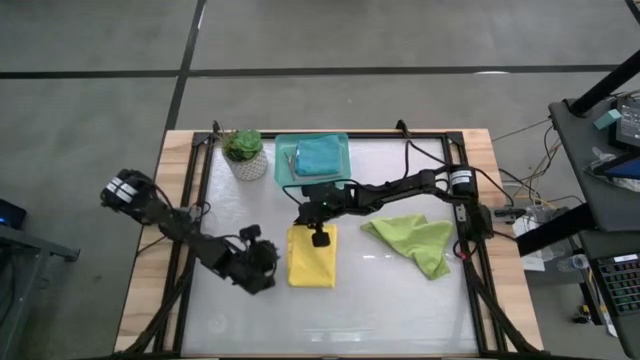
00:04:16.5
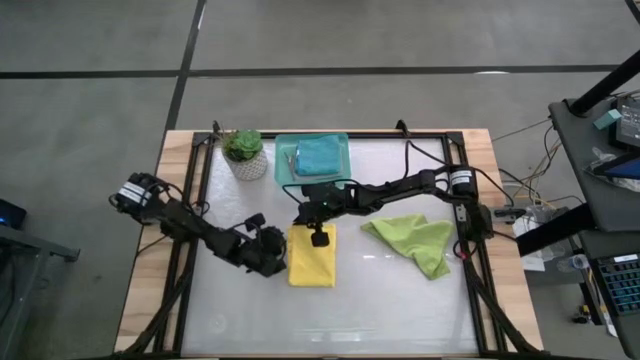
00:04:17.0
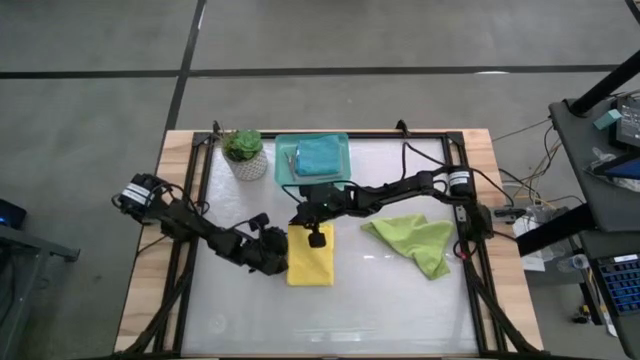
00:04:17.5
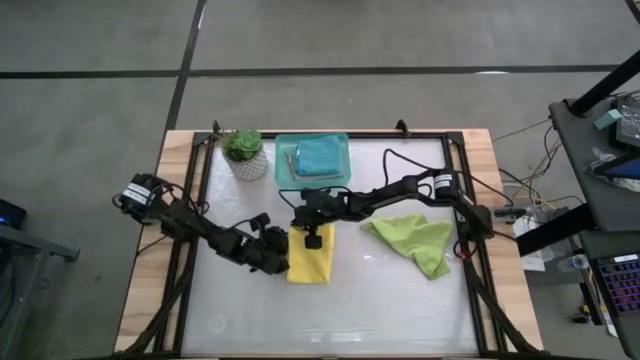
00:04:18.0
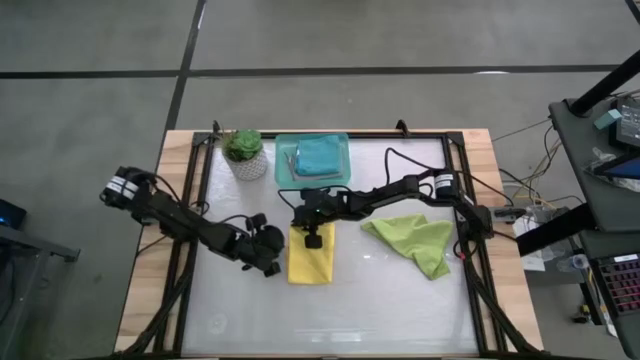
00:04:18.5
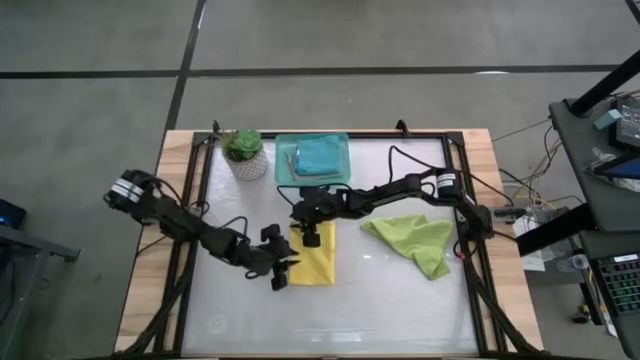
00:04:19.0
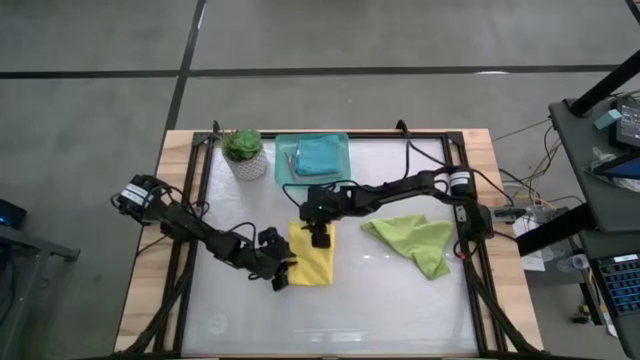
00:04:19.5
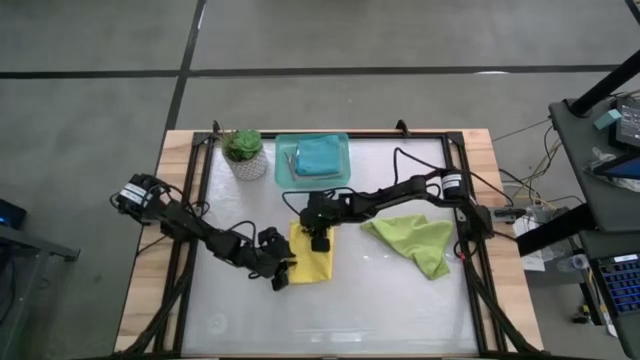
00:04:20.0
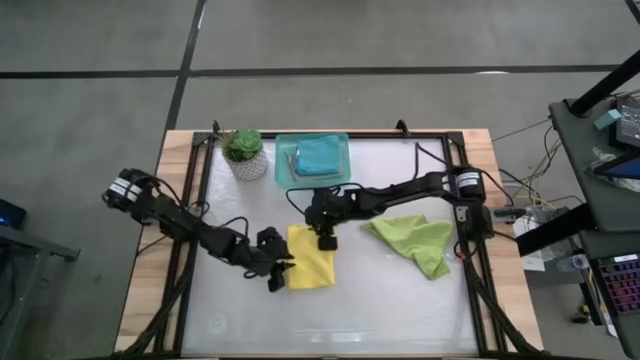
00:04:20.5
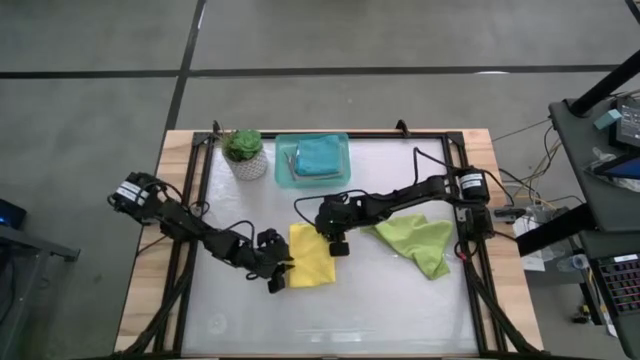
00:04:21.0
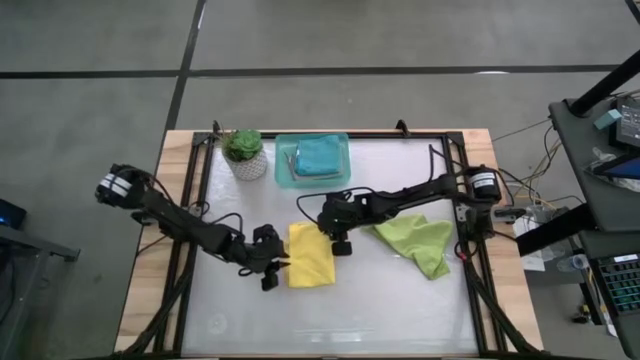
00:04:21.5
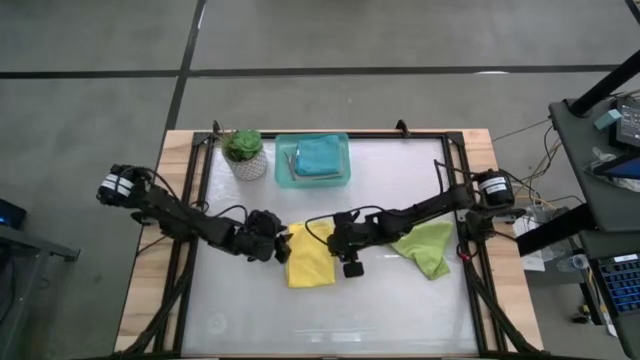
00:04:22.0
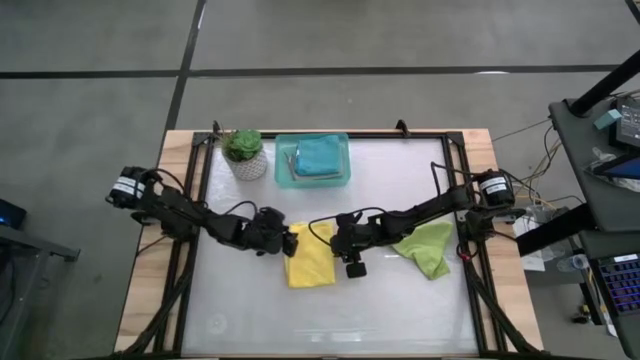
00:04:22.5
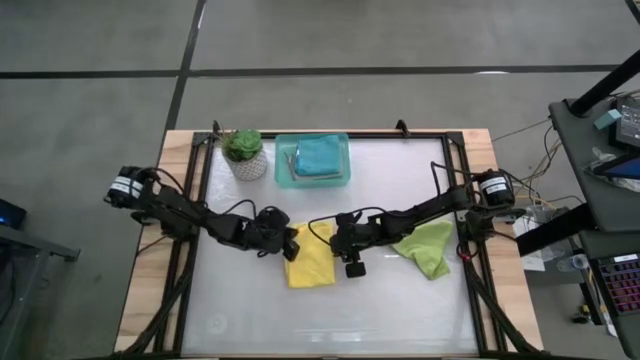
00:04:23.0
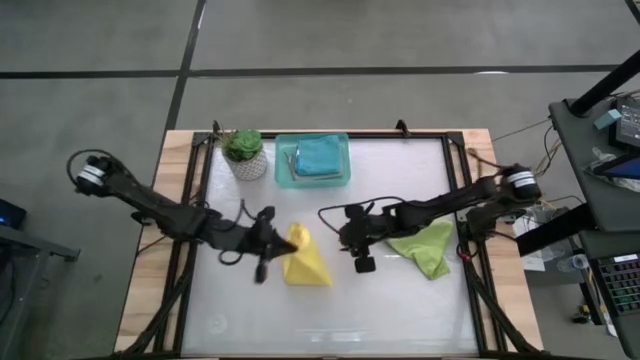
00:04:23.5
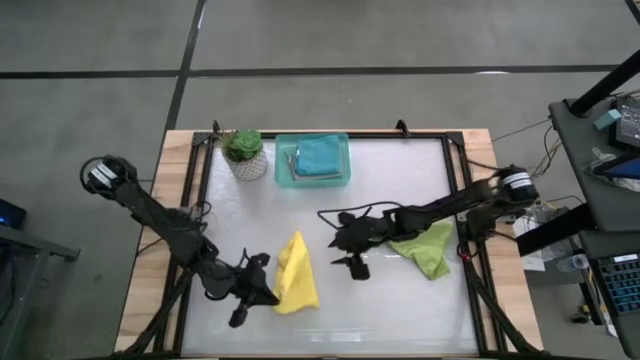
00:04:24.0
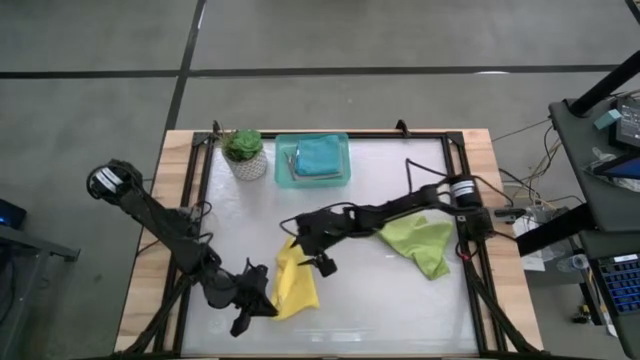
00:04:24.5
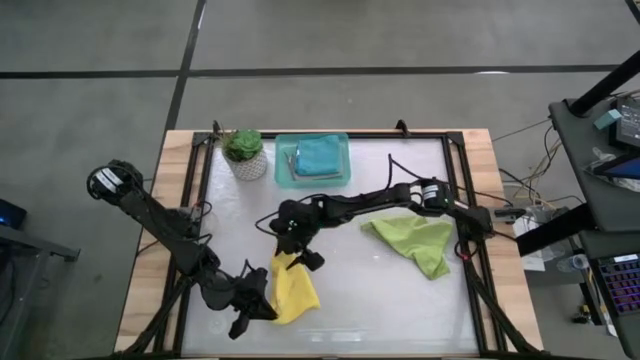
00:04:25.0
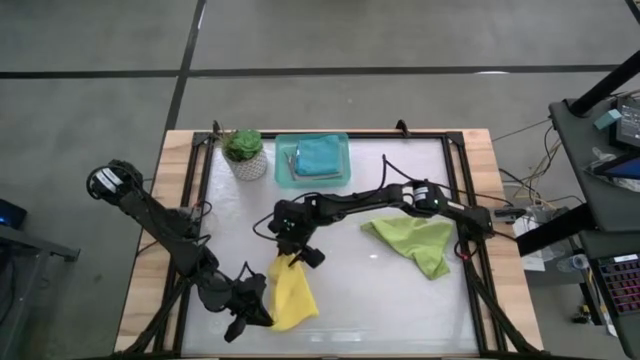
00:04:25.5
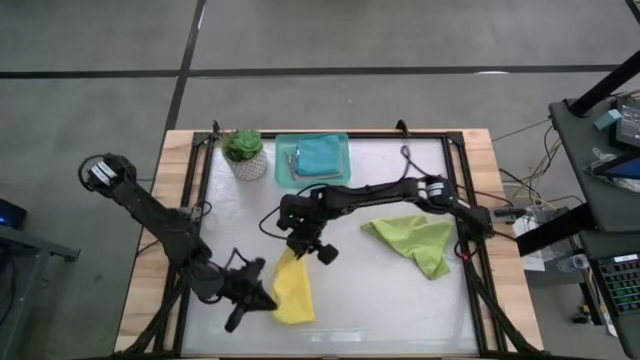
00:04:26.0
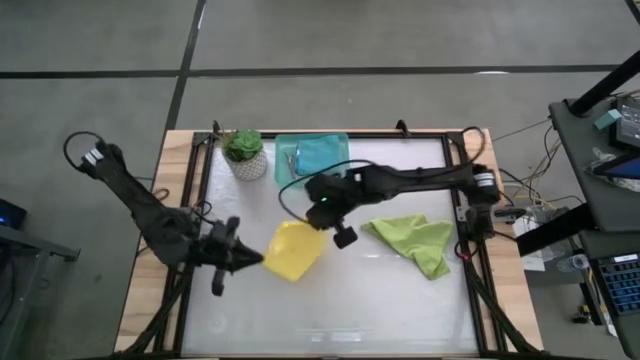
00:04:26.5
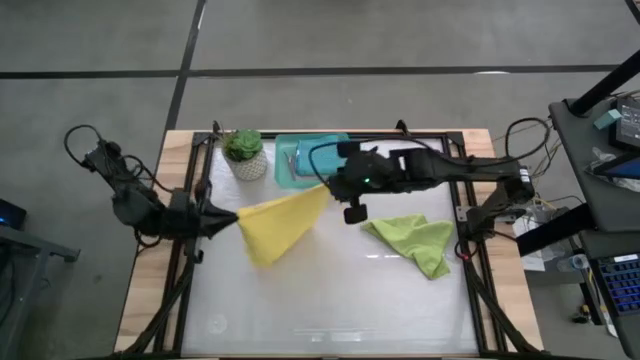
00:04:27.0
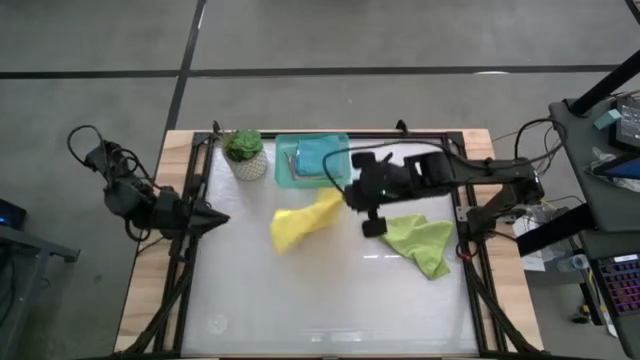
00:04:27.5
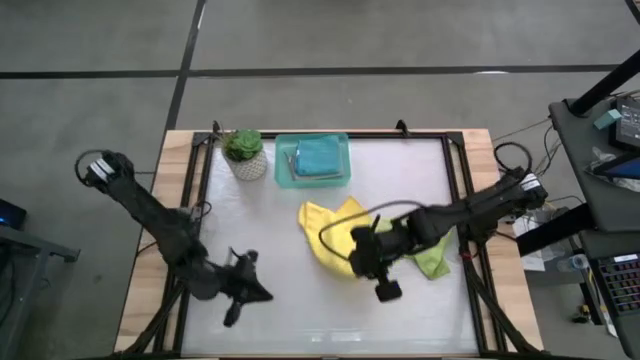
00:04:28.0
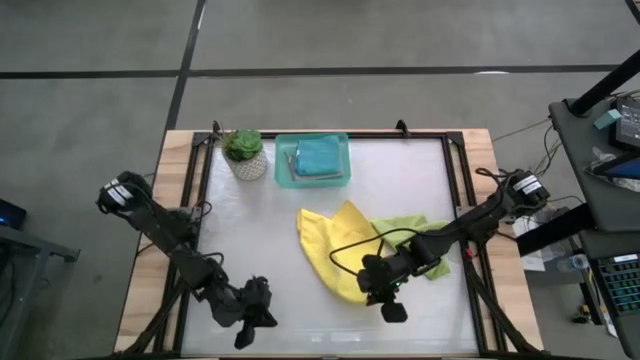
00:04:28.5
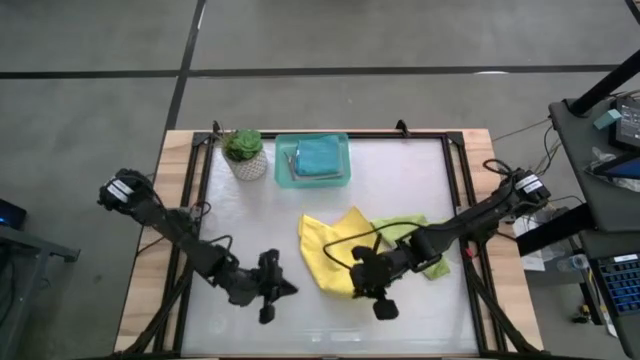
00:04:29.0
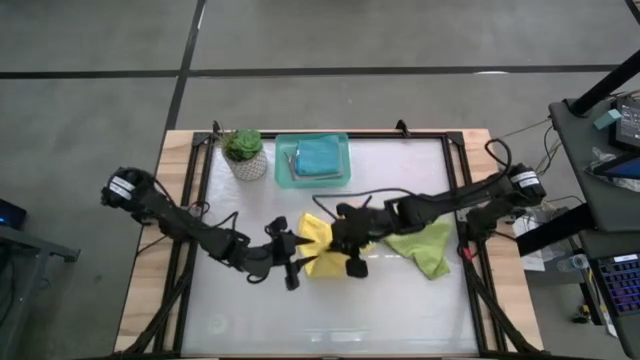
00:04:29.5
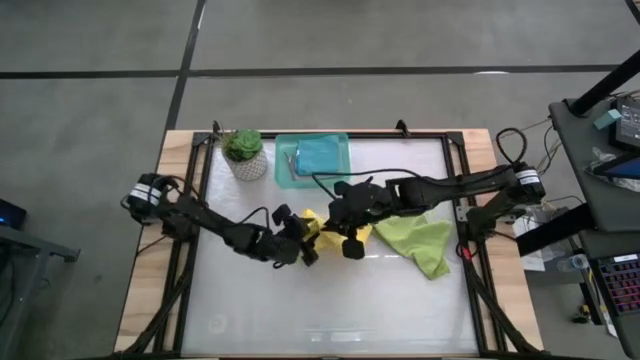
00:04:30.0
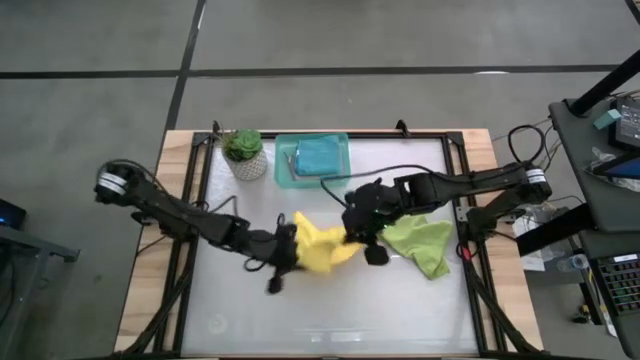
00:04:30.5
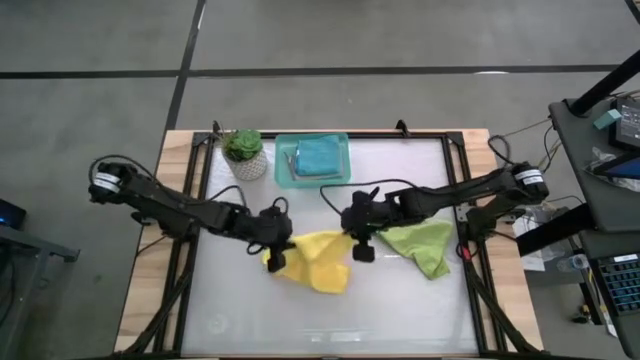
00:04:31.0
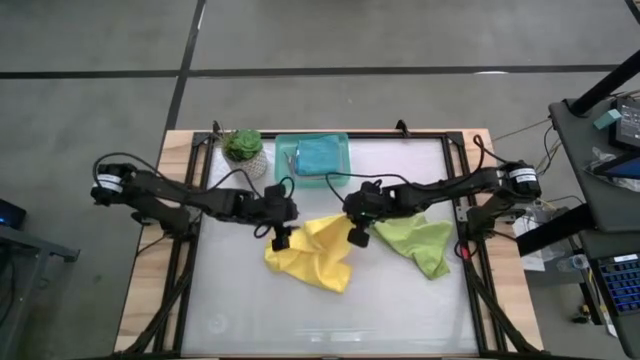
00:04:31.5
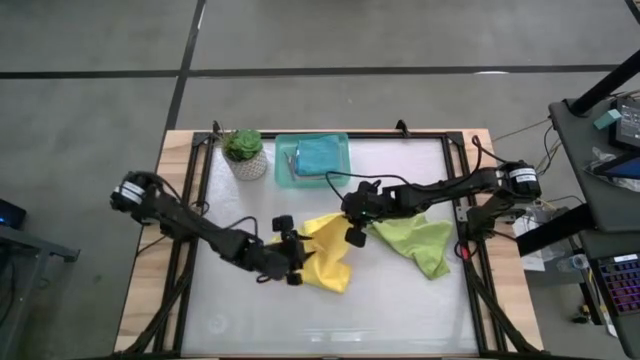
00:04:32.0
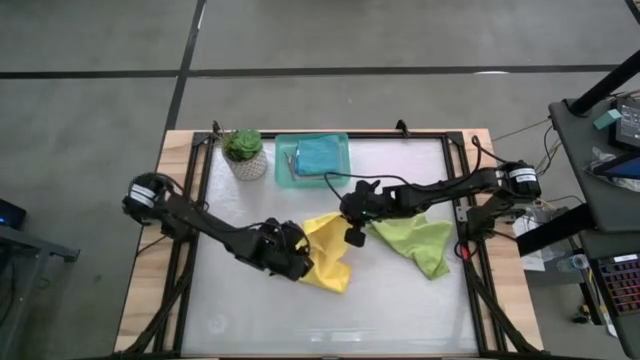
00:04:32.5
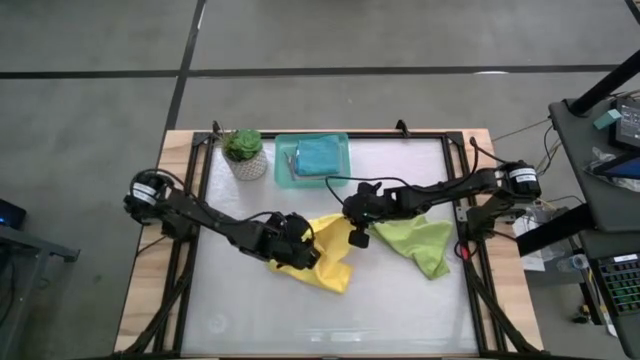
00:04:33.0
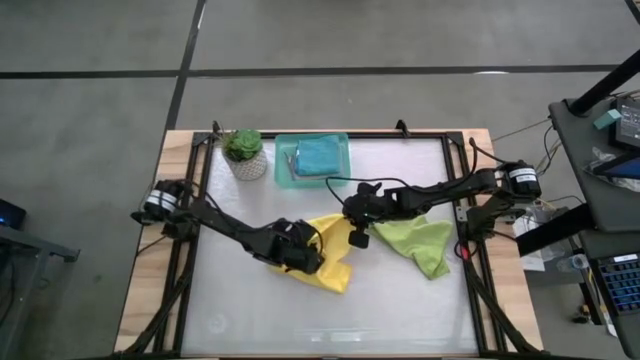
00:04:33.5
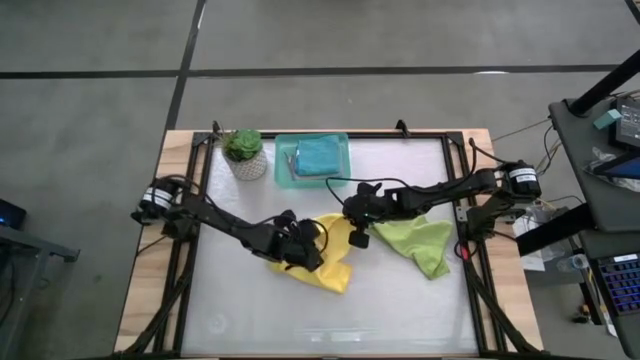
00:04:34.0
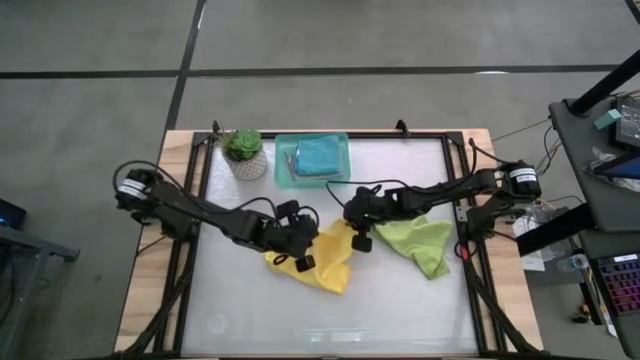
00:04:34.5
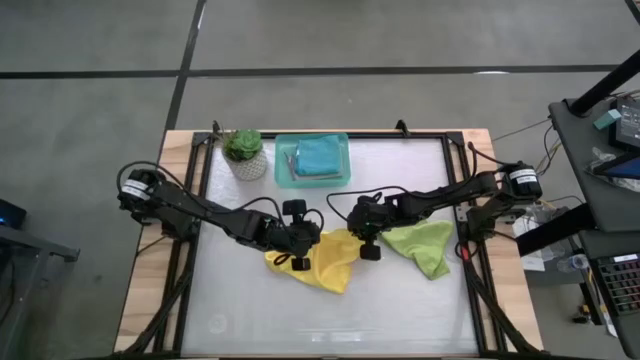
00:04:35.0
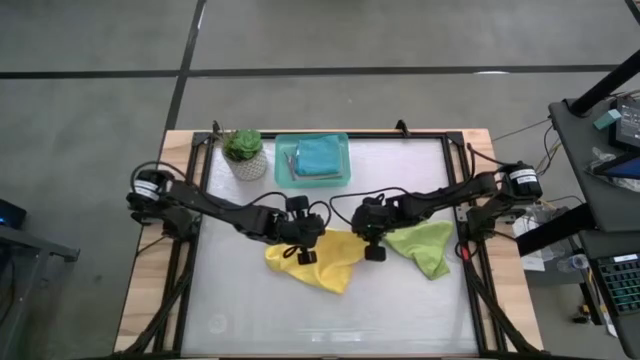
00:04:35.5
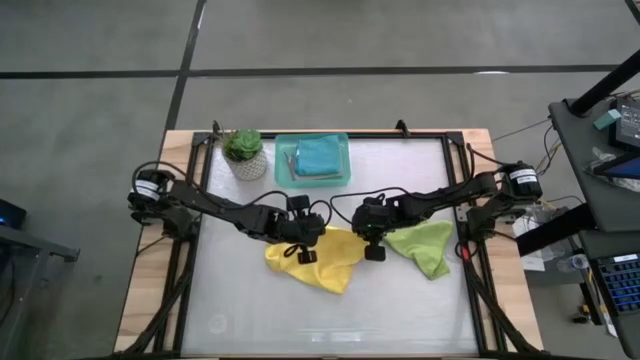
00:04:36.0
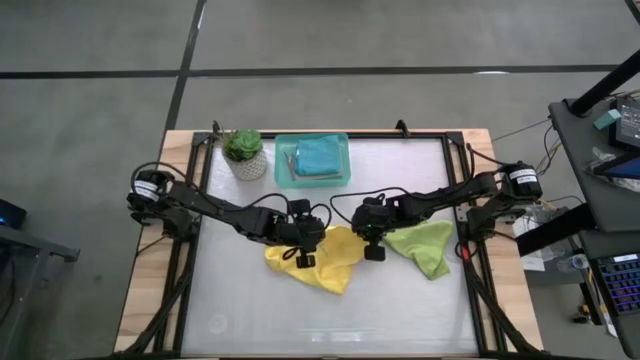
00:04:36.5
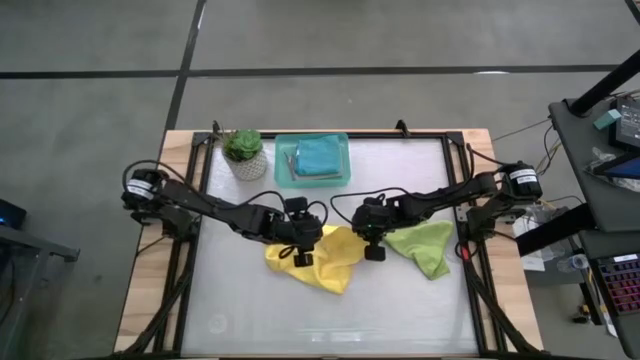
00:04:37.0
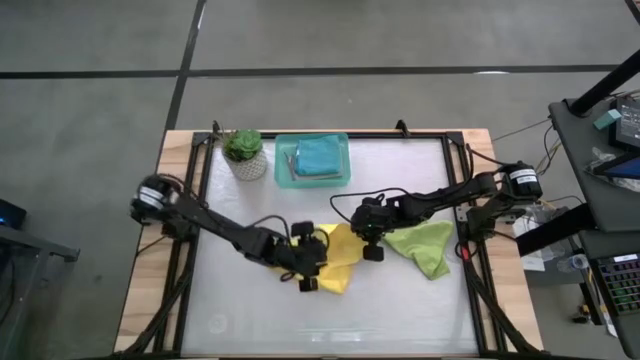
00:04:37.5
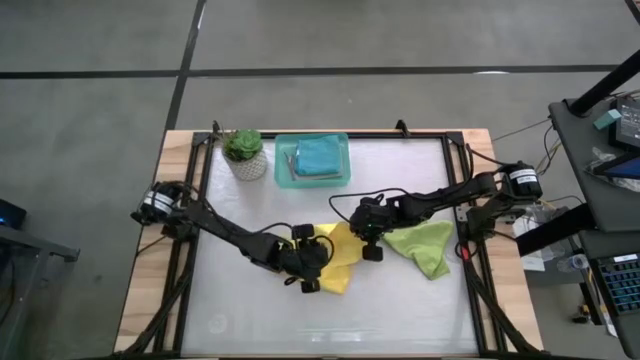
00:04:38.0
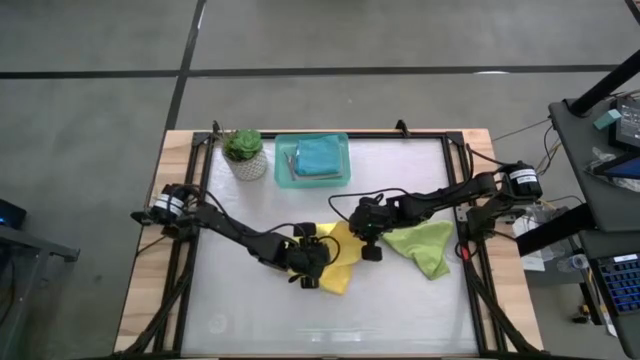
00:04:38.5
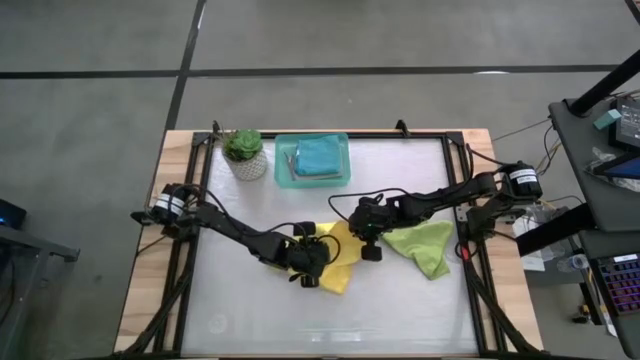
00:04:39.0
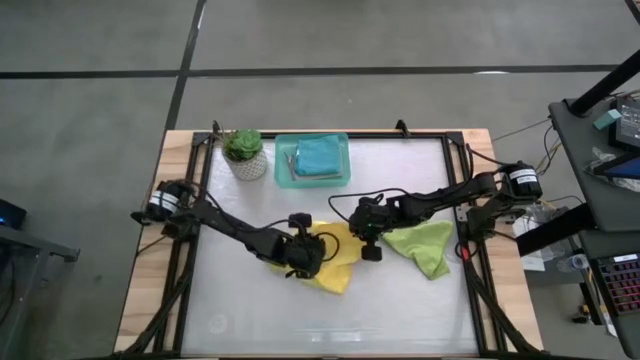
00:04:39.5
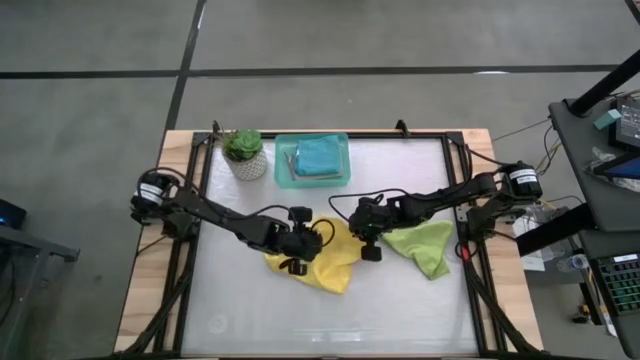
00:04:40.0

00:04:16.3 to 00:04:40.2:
Task: Fold microfiber towels
Fold the yellow microfiber cloth
